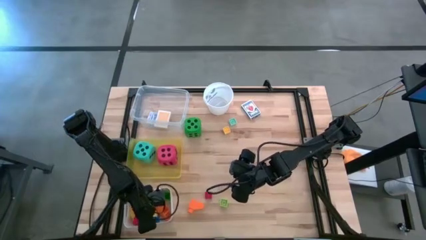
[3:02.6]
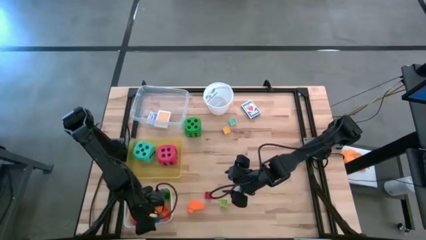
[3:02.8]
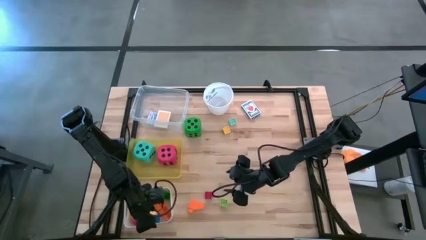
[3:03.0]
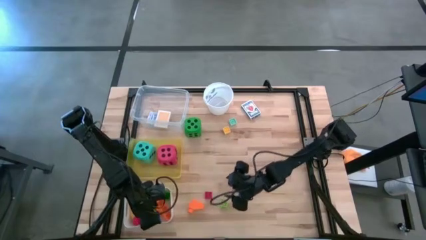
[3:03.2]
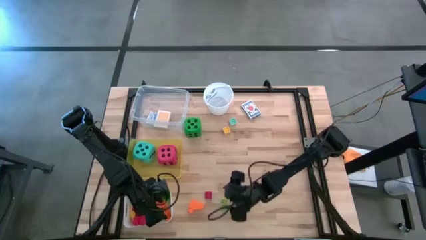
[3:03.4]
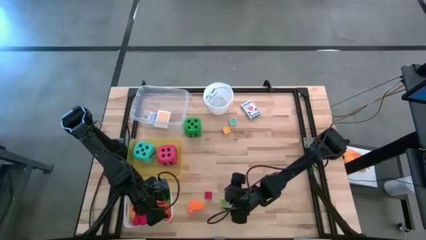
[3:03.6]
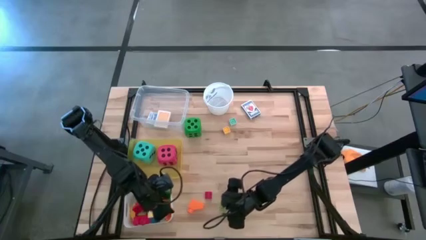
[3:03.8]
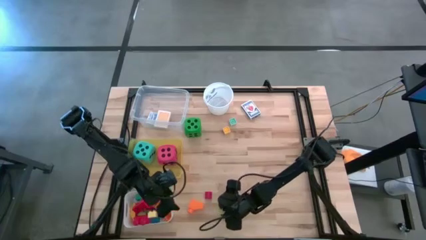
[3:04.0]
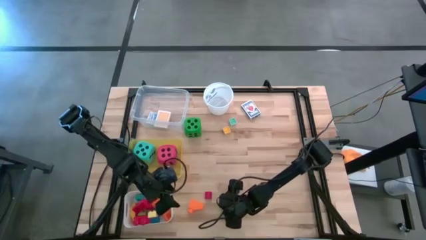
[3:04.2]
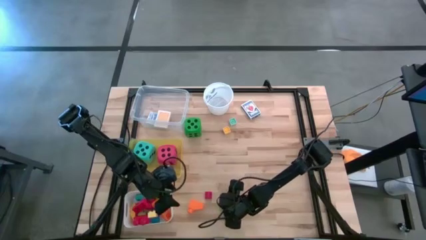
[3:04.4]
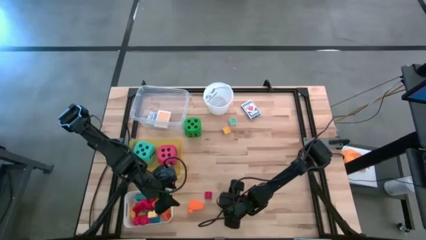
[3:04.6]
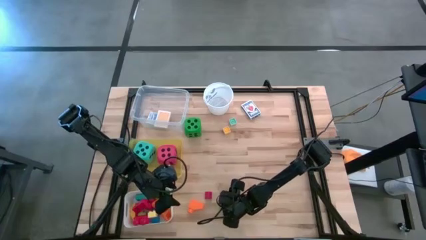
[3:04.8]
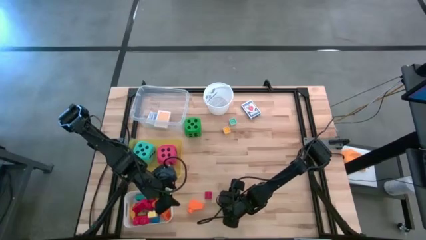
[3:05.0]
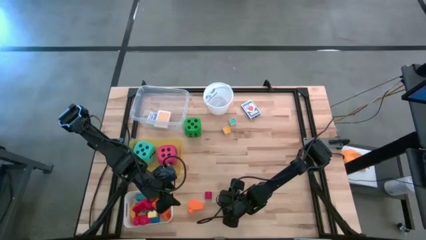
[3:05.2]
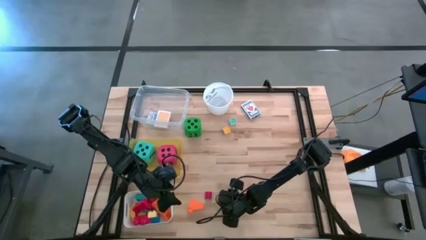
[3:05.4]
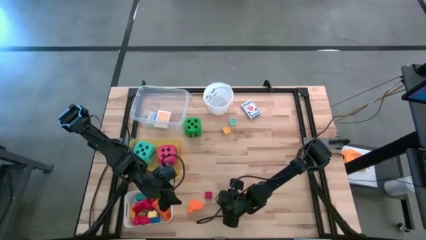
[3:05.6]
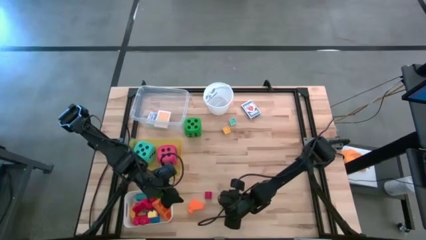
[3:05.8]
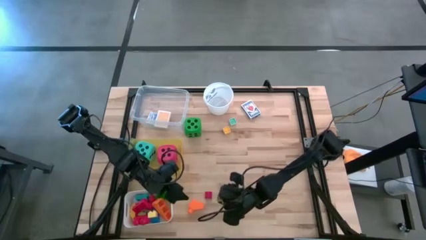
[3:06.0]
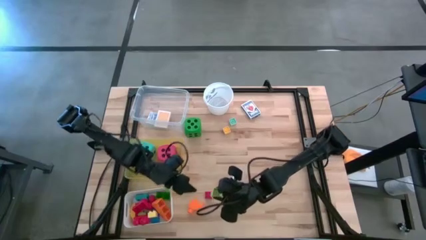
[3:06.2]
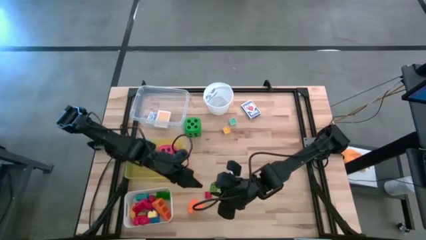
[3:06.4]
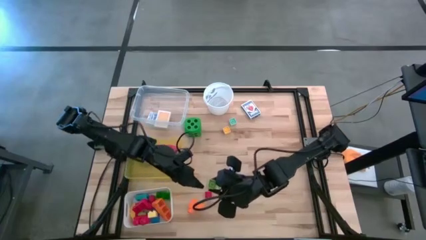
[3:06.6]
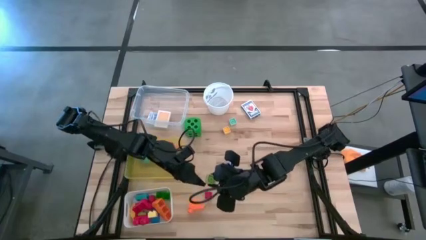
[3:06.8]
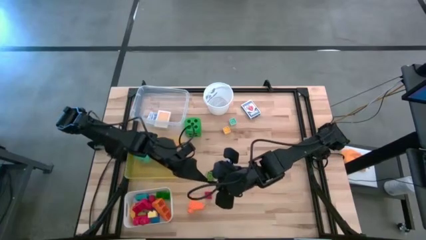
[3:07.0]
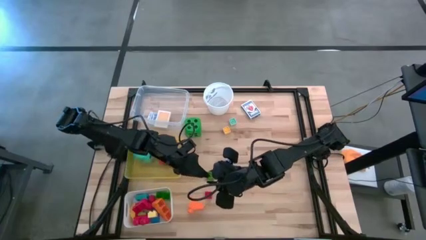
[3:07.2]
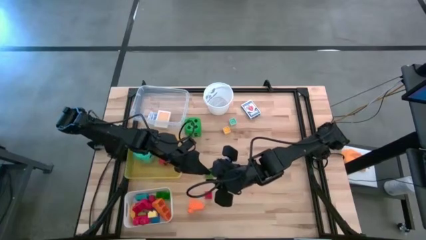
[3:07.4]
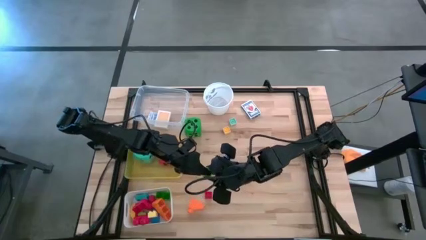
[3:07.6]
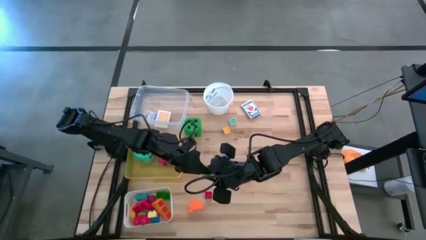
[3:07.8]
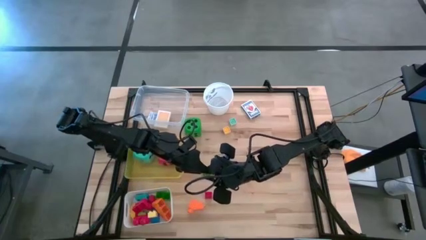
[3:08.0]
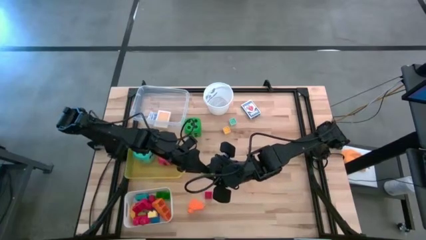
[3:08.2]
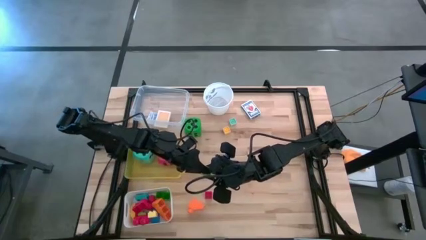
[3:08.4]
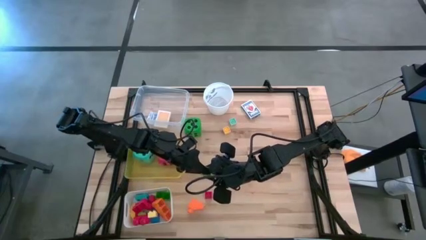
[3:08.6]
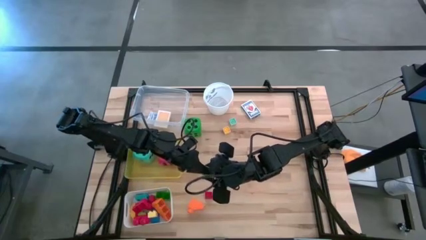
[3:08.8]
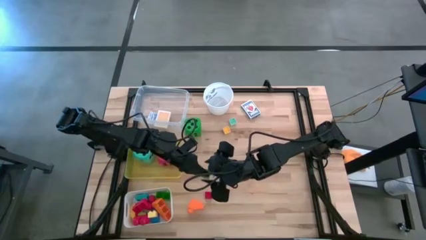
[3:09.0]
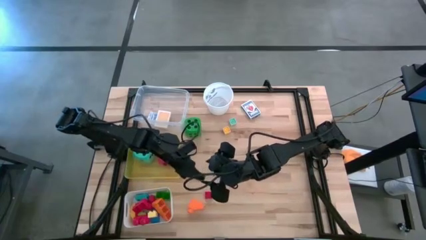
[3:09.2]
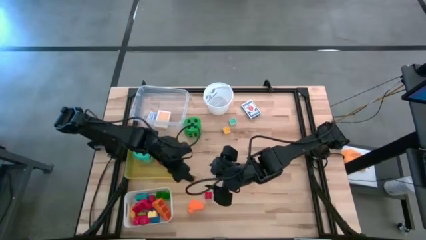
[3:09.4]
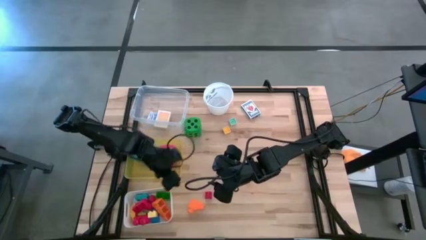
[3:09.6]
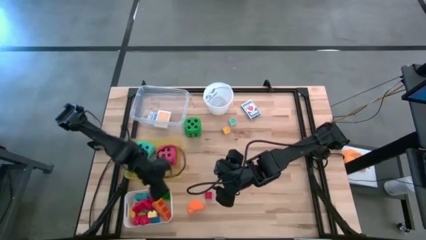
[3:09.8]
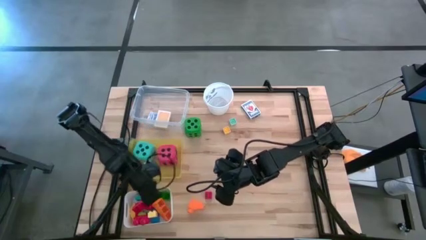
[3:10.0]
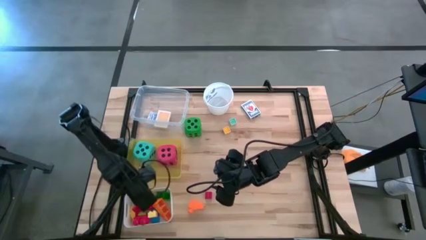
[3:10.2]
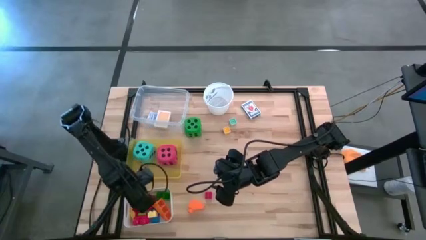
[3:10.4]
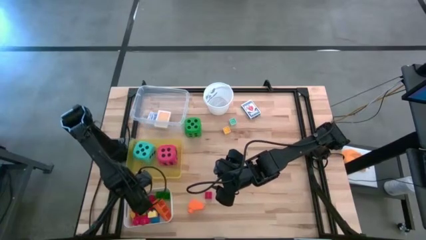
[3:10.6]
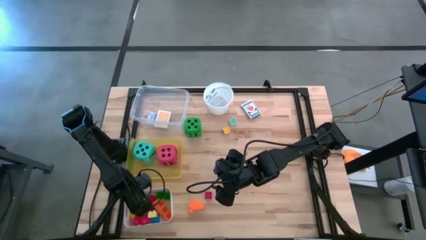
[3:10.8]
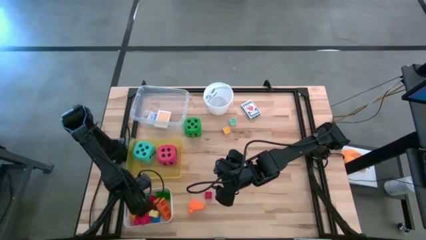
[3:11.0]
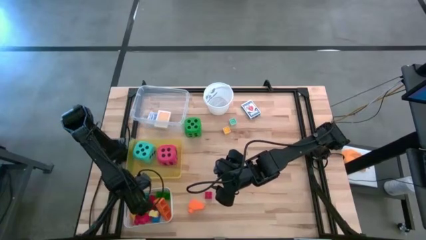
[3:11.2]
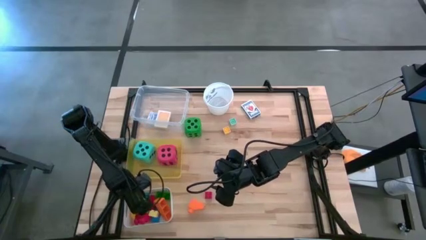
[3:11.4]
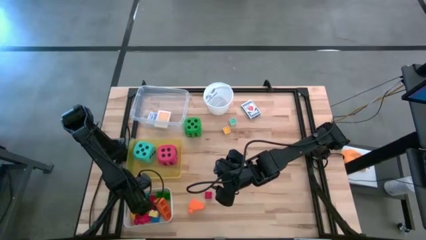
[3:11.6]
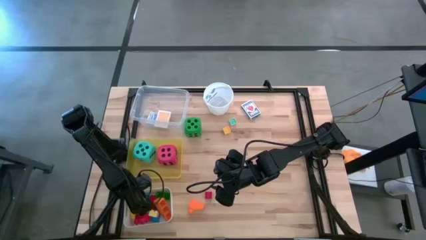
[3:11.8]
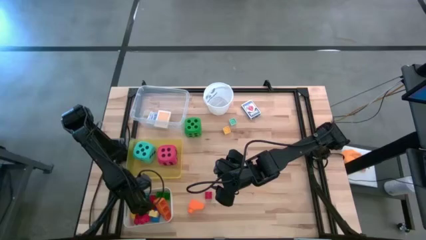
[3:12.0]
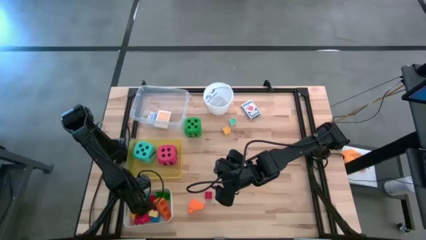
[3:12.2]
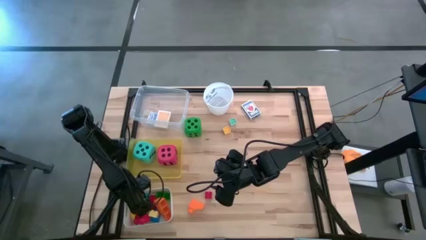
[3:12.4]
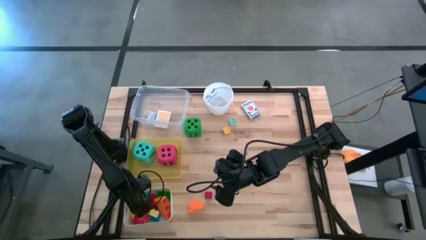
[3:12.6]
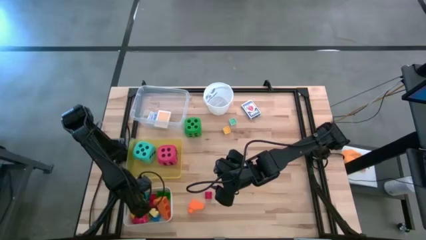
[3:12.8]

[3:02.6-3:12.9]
Task: Pick & Place Toys
Put the light green game piece into the white bin

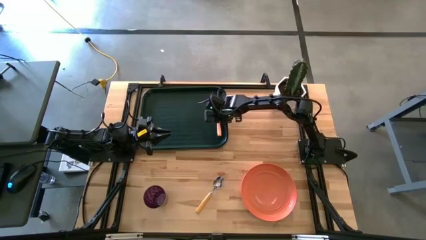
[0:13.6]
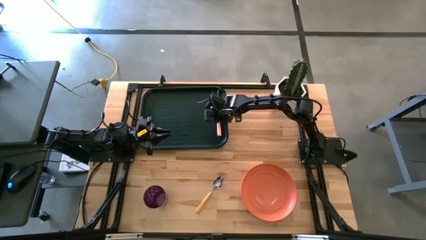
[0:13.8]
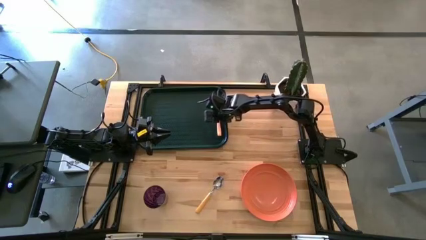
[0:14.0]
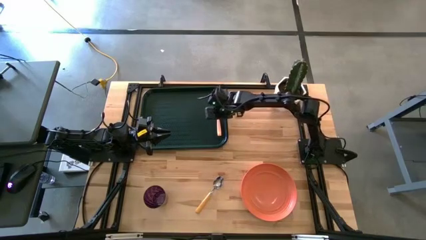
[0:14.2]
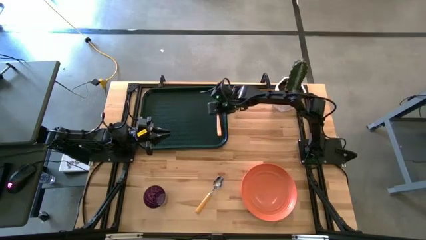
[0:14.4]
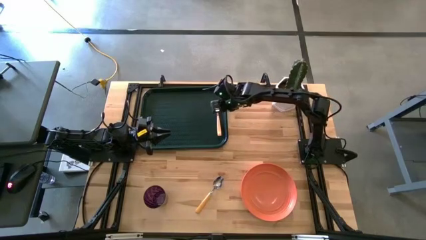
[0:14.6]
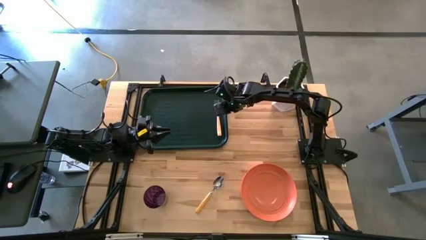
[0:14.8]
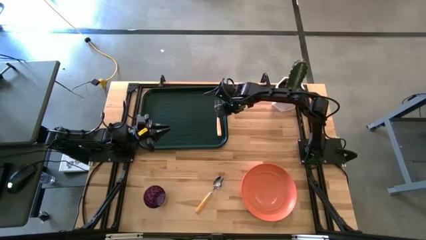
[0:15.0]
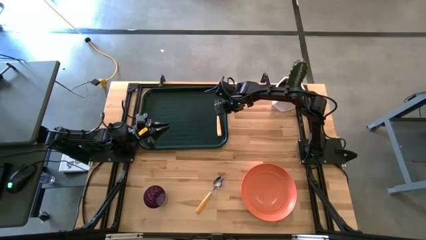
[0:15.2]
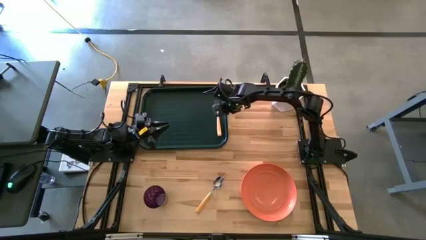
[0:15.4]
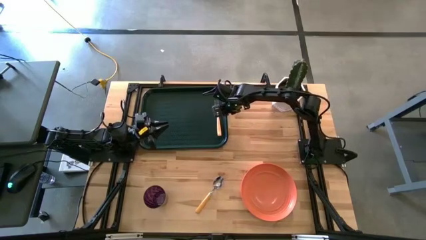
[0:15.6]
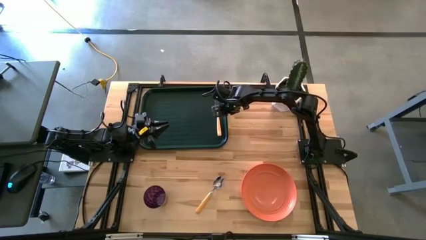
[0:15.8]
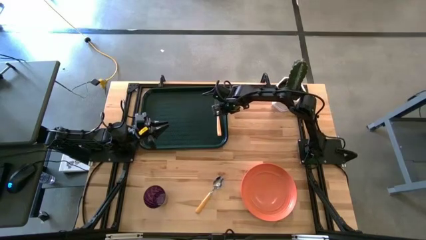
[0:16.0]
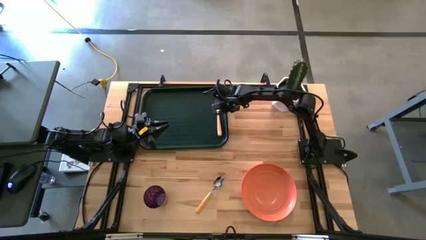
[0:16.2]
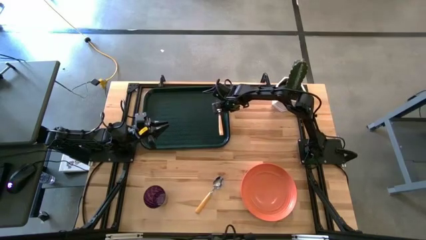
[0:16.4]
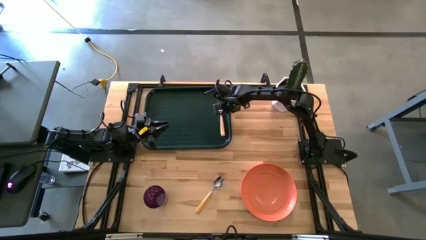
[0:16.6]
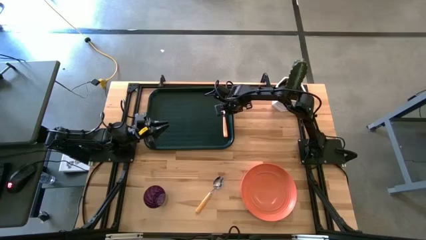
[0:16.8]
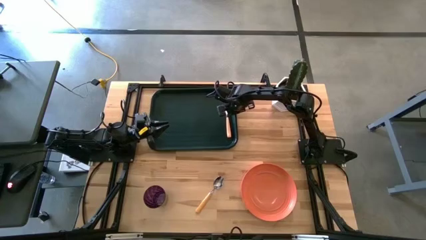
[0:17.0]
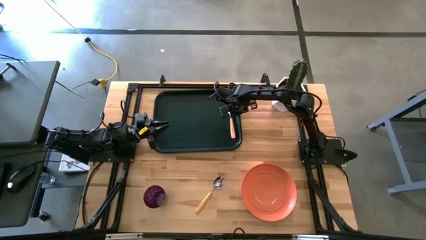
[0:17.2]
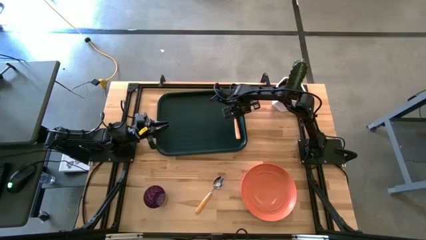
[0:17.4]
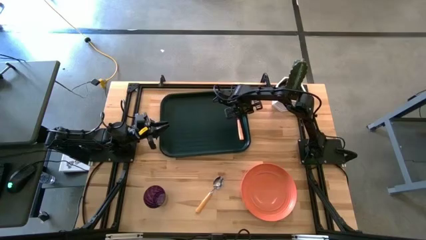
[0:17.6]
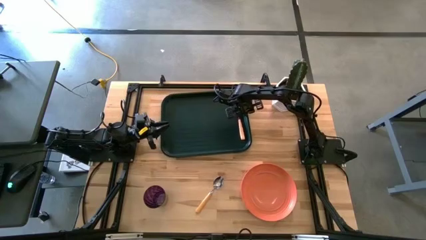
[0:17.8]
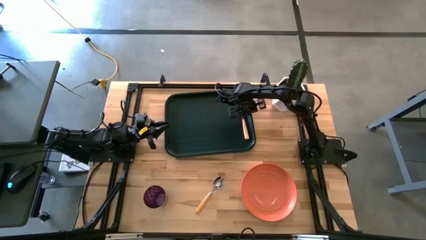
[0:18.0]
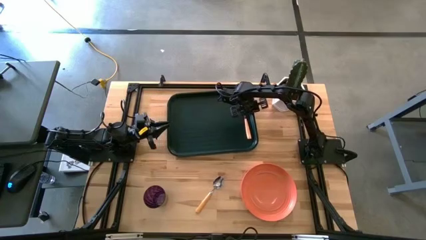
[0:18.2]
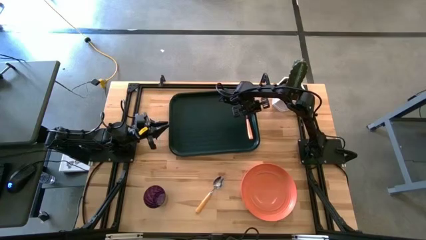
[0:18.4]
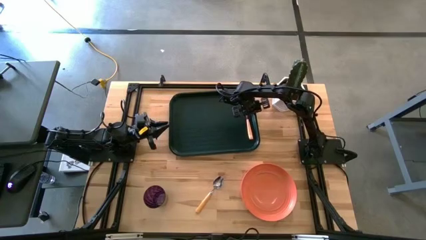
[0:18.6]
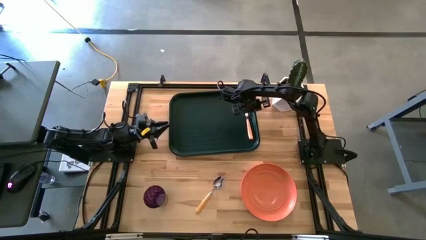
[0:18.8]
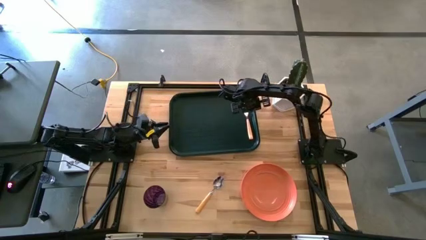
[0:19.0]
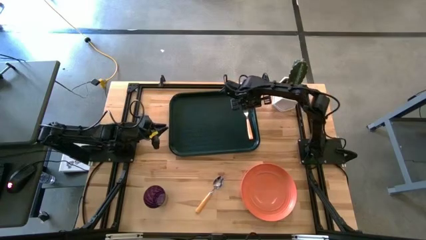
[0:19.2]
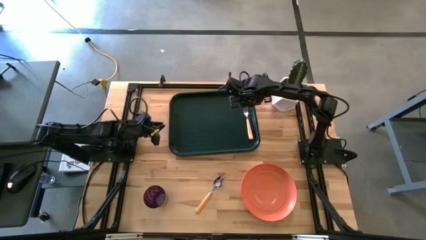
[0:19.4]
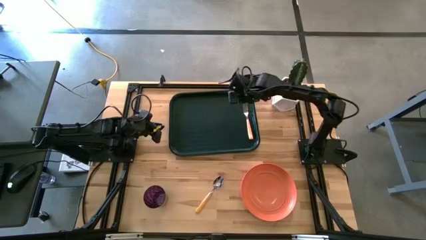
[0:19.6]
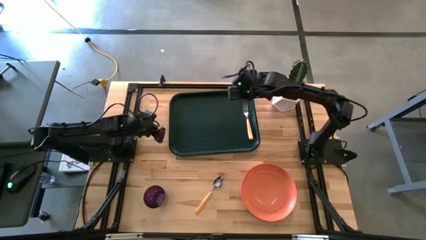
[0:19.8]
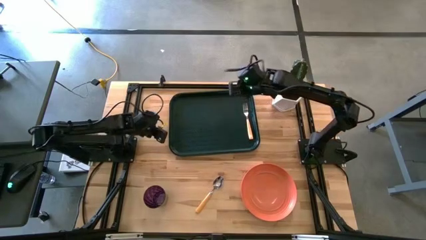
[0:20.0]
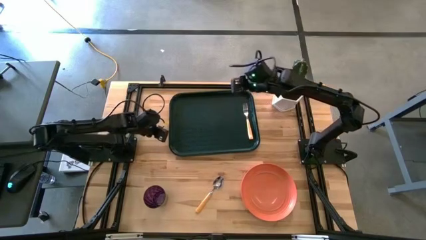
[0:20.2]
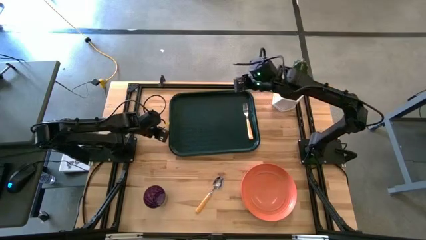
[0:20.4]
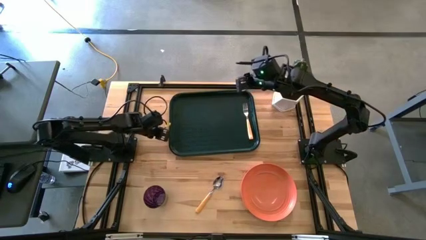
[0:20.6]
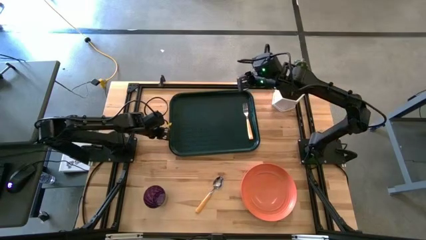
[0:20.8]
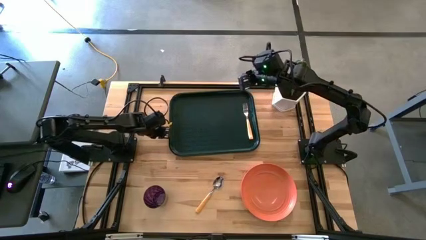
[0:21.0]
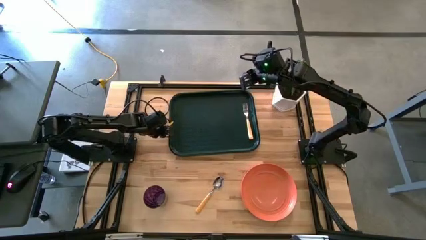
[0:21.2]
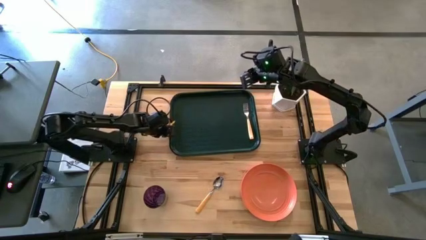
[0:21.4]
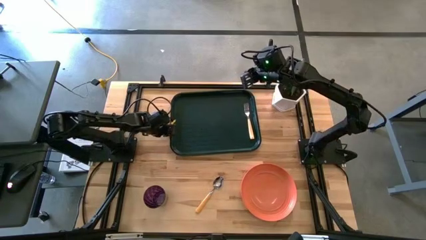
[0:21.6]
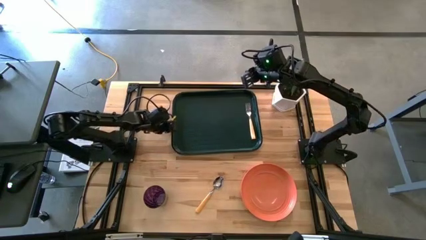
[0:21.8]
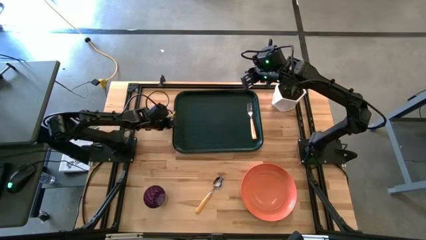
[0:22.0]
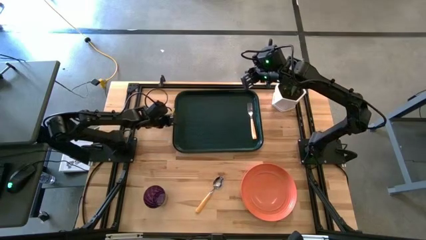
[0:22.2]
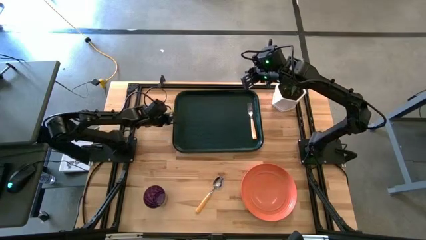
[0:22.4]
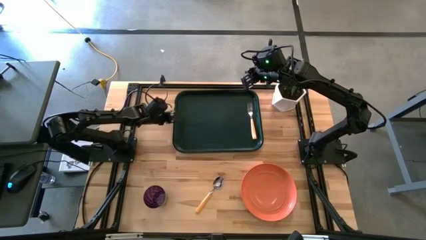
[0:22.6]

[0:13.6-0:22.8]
Task: Pick and place plate/cup/fork/spoon on tray
Adjust the black tray
